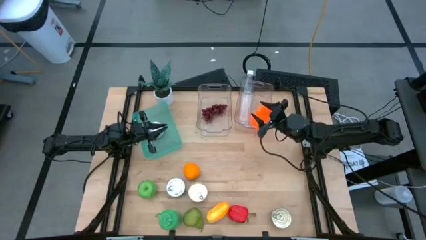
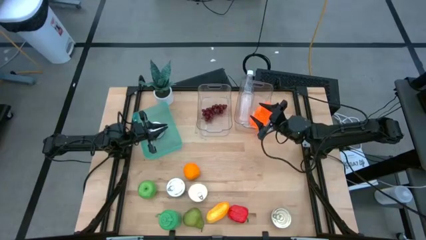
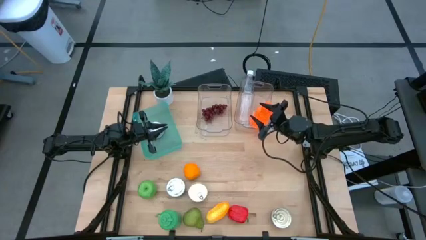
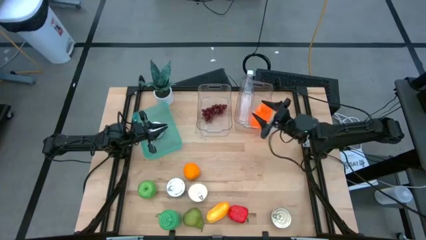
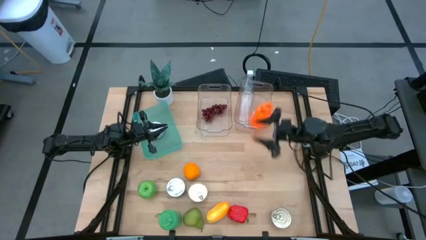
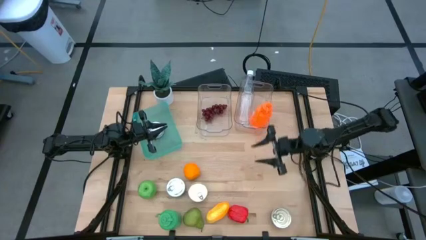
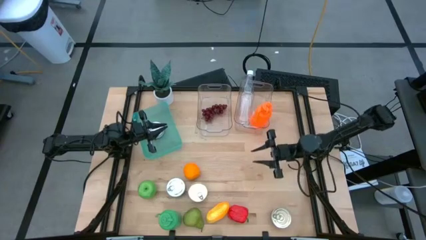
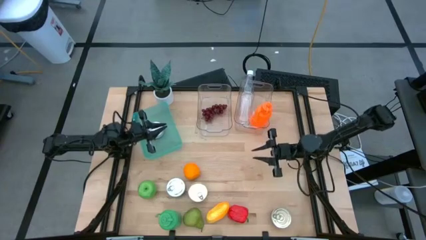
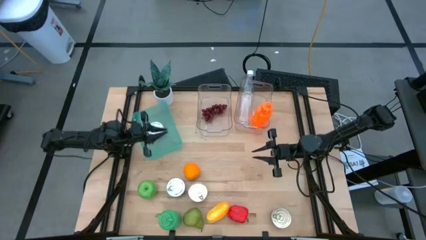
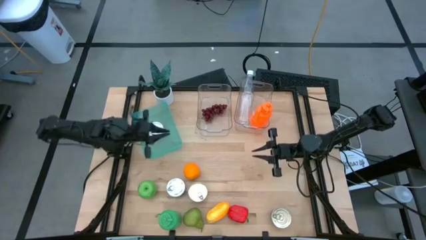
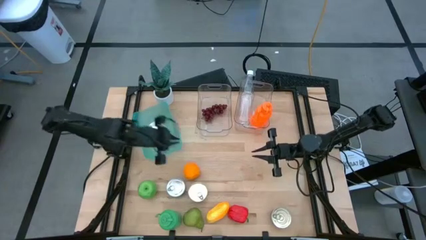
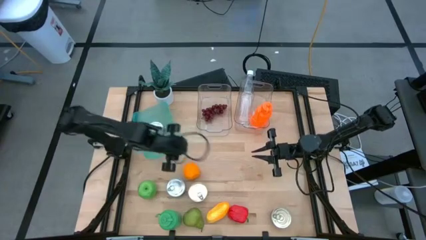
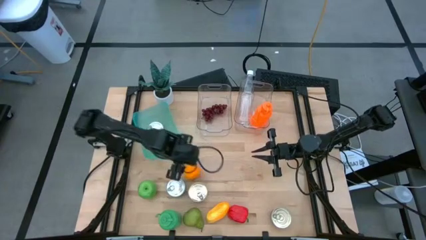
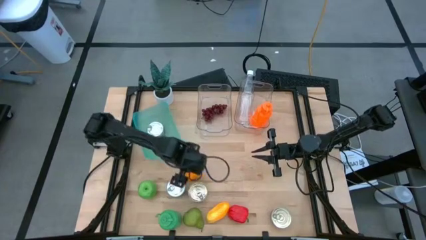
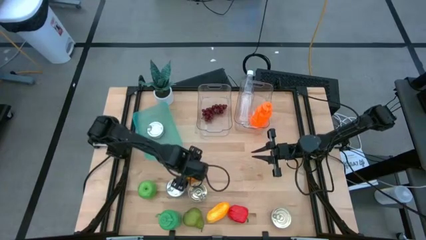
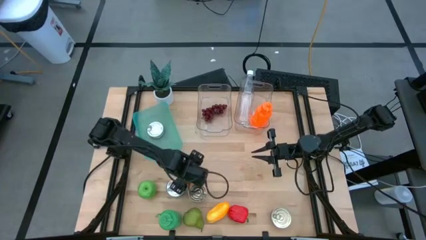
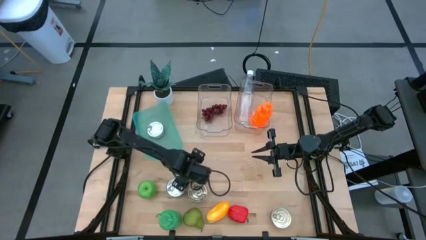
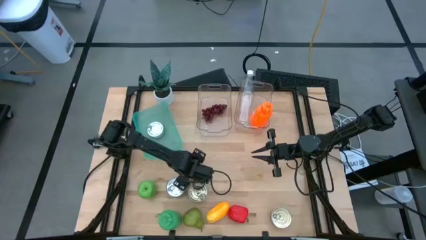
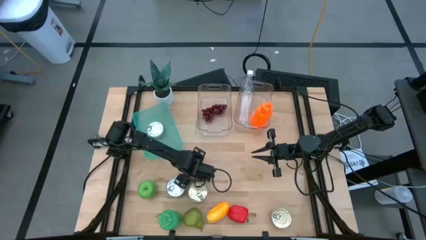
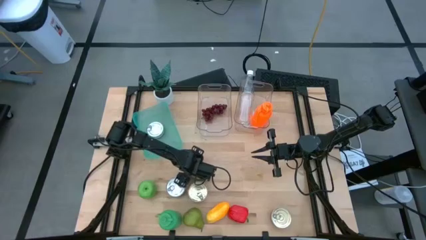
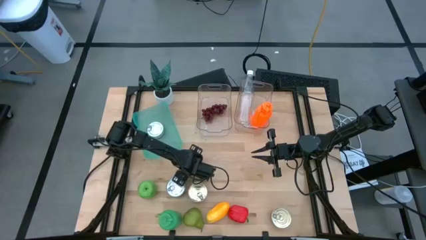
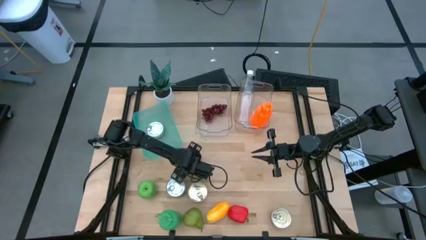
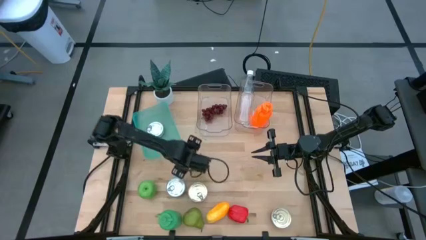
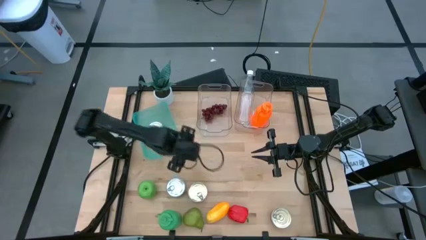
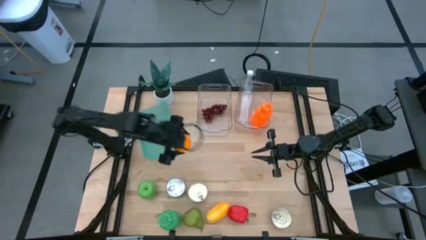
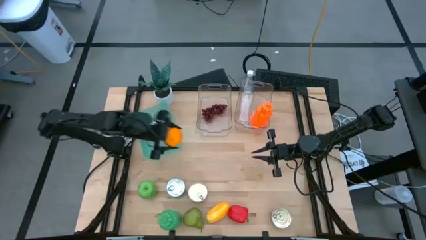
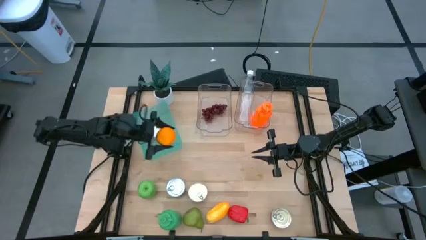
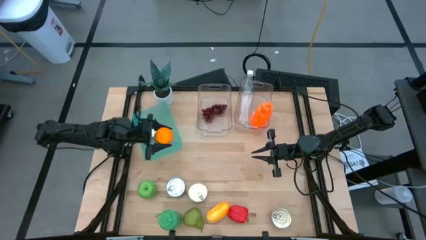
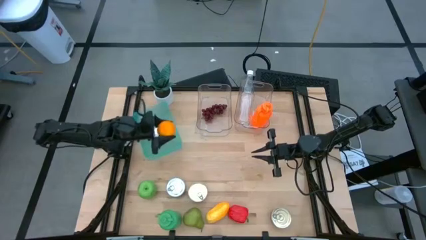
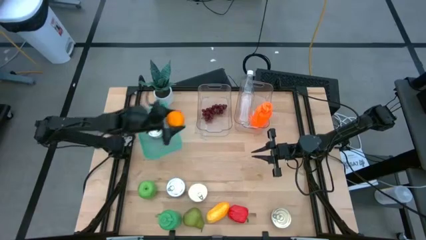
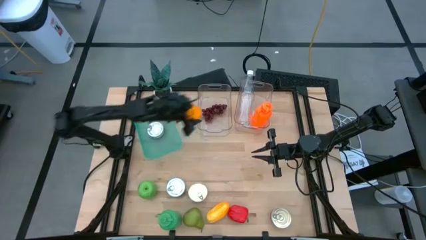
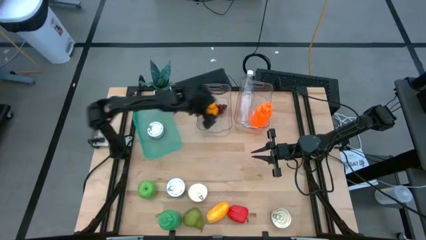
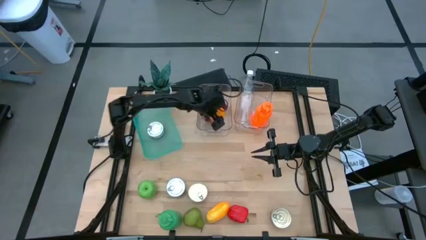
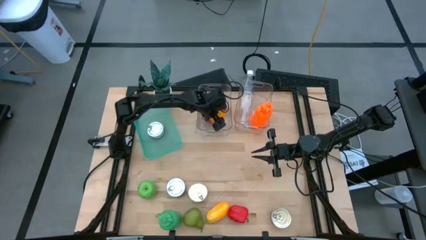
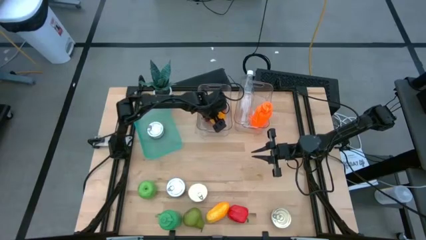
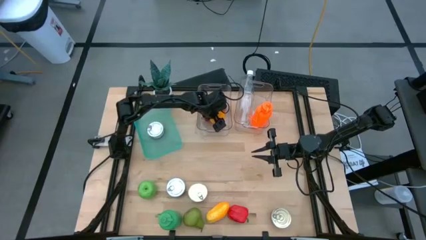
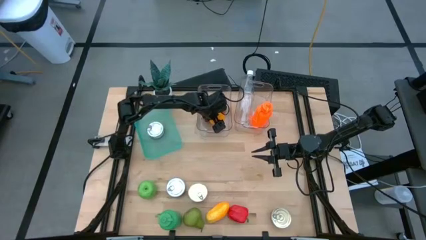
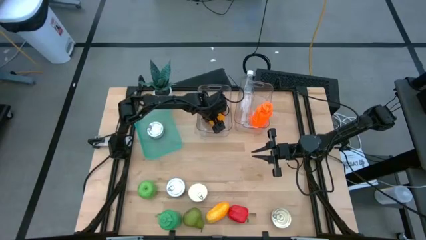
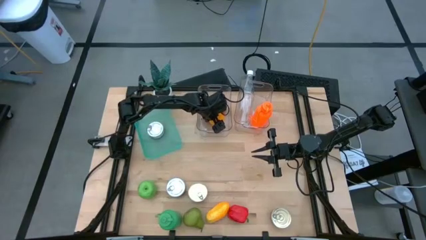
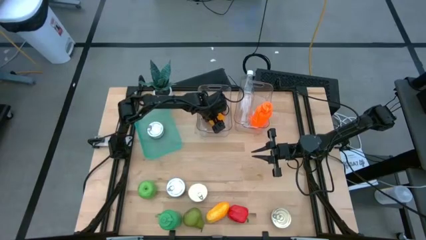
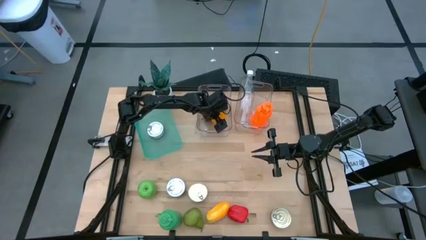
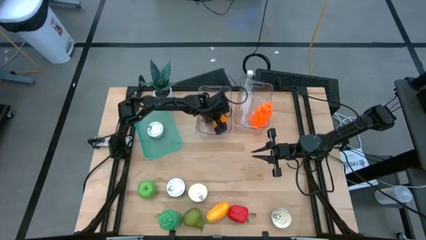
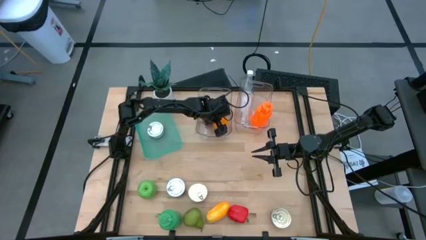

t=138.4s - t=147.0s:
Task: Pick & Place Food Item
Put the orange into the left transparent bin

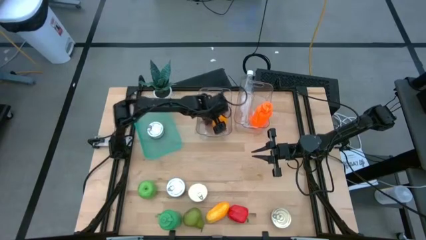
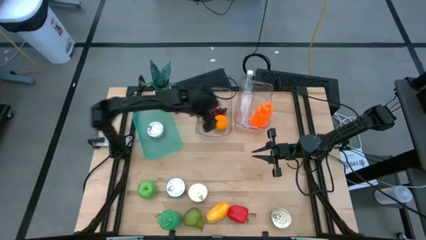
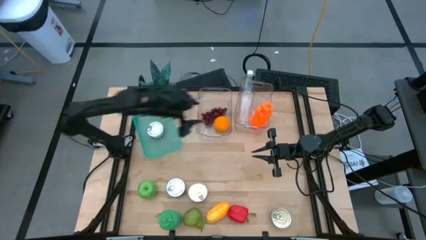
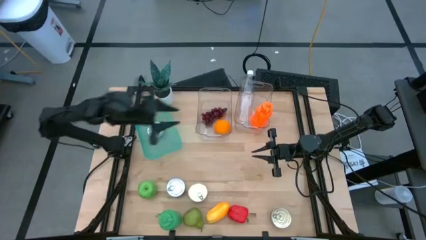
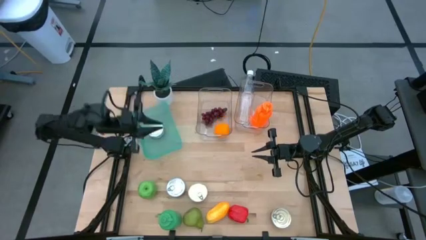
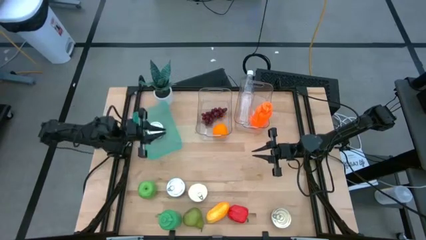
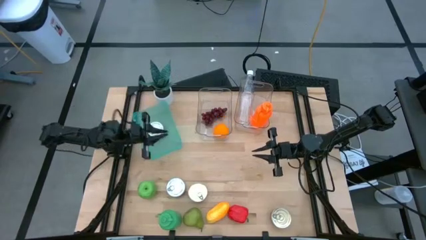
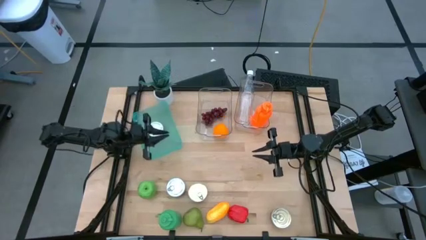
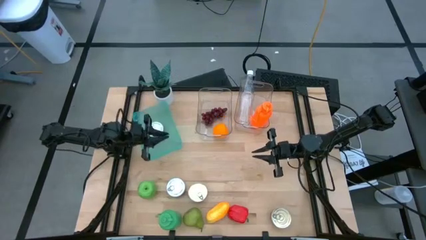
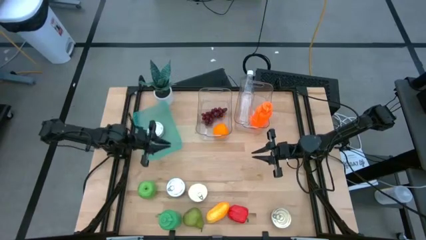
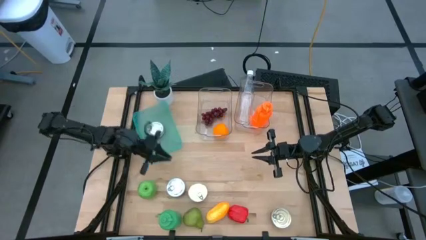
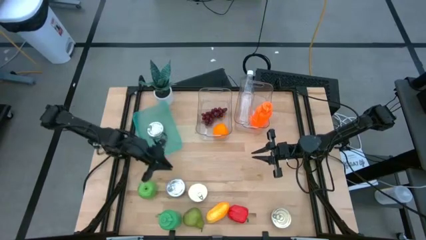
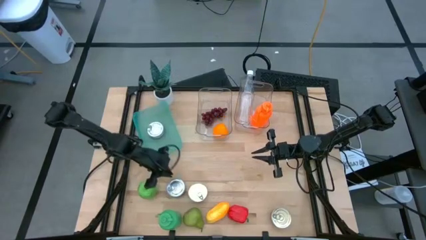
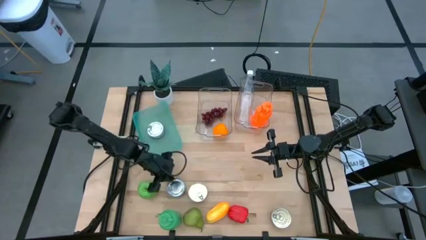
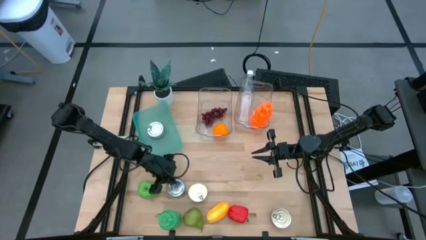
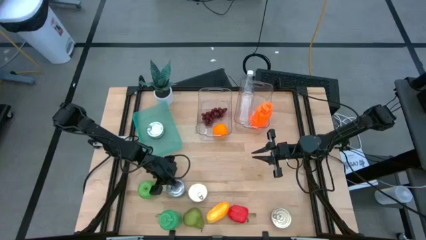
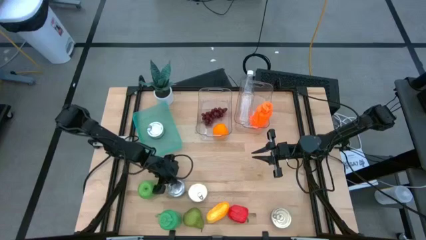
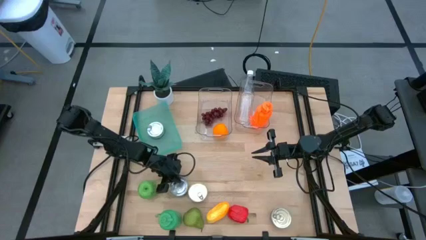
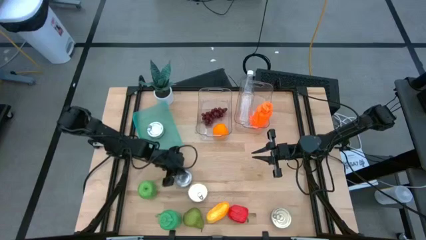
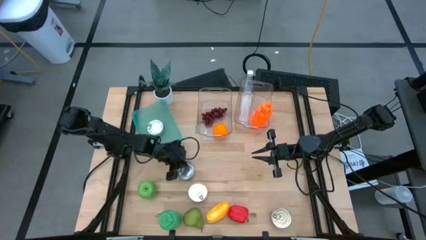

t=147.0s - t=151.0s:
Adjust the green tuna can on the table

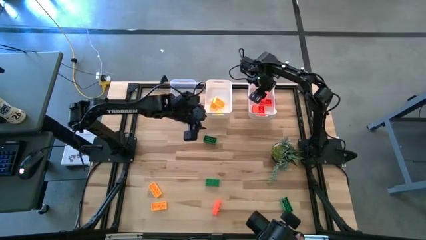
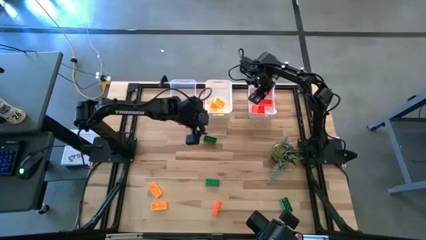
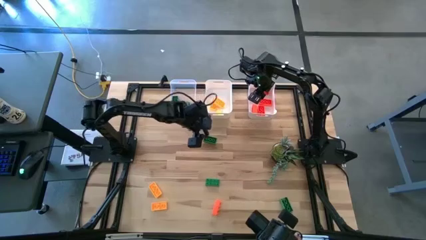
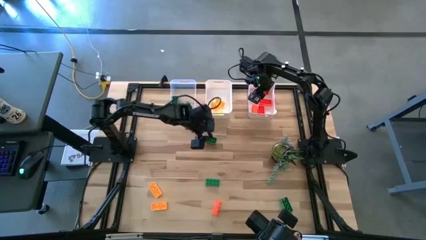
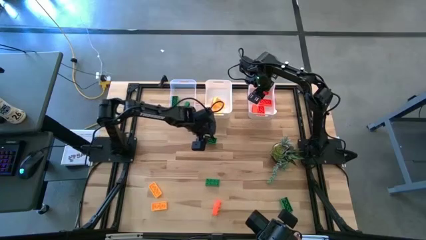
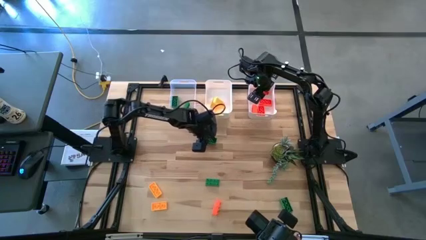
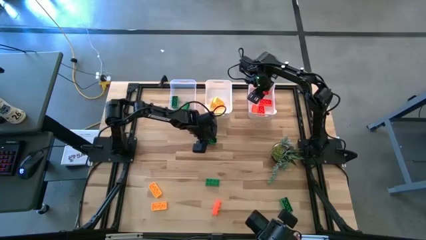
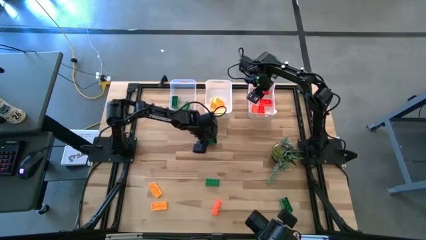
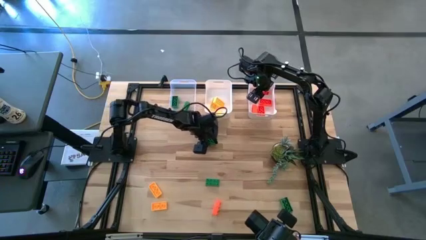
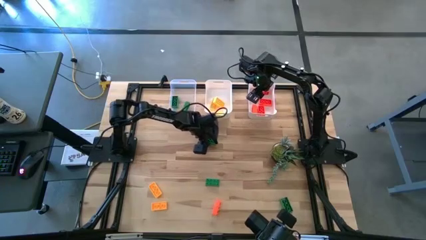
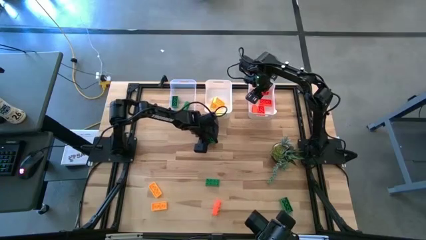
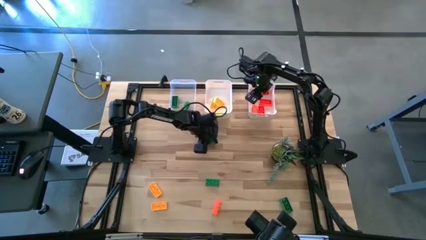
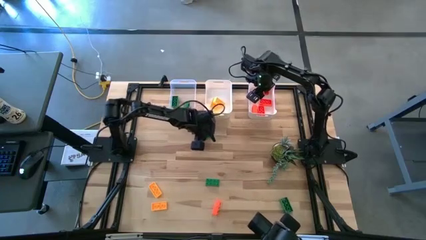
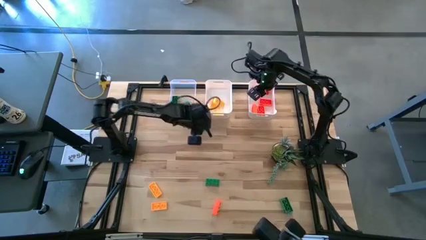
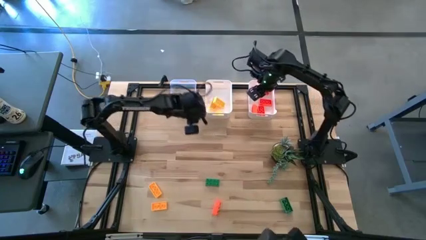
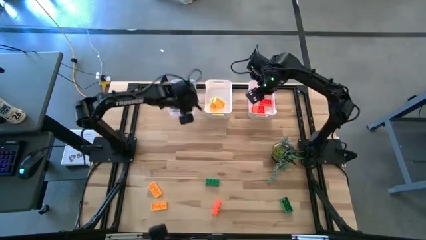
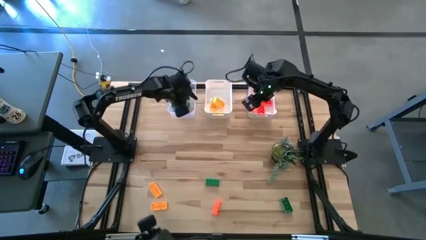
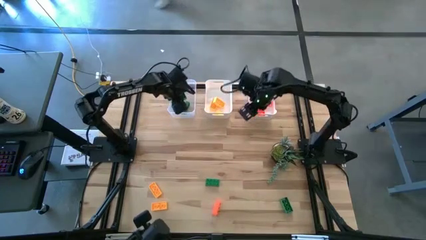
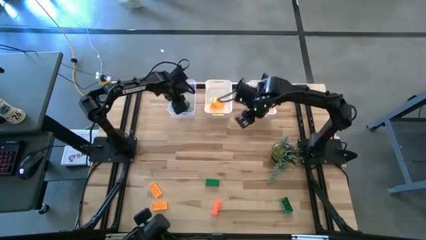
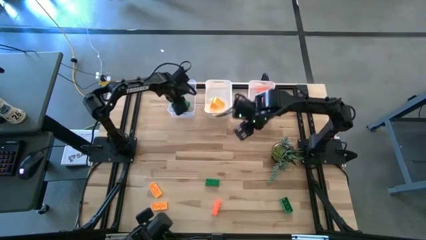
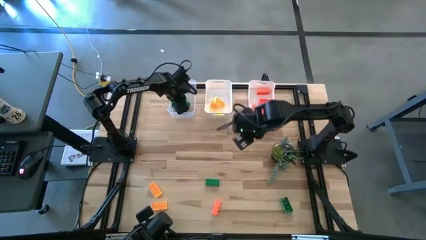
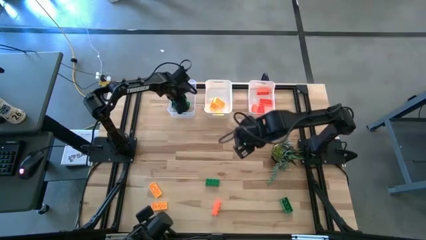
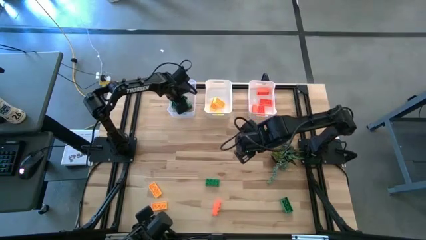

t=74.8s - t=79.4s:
Task: Sort & place blocks by color
Put the green game piece into the transparent bin
